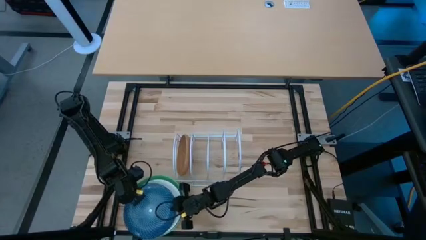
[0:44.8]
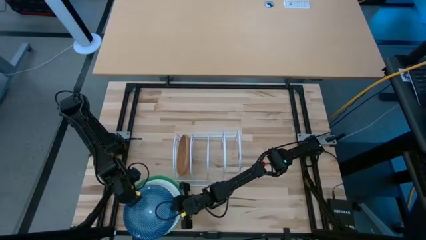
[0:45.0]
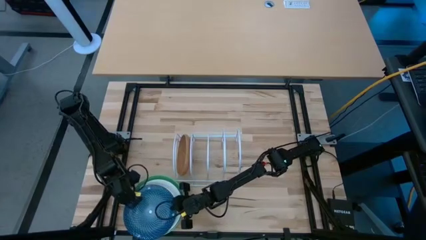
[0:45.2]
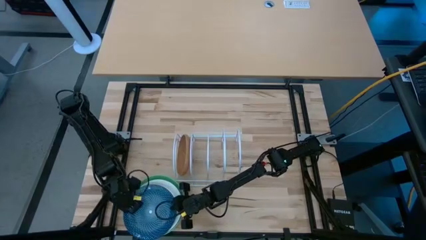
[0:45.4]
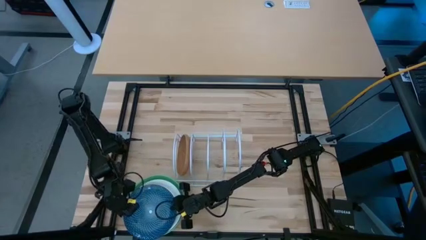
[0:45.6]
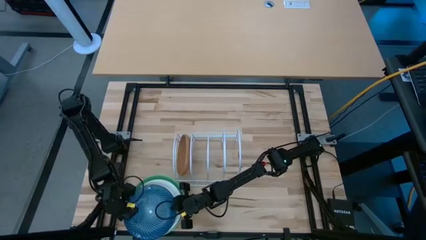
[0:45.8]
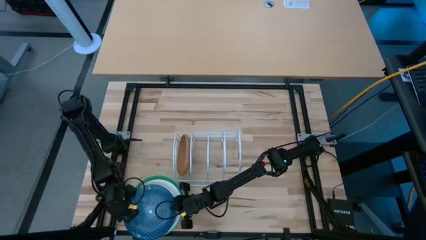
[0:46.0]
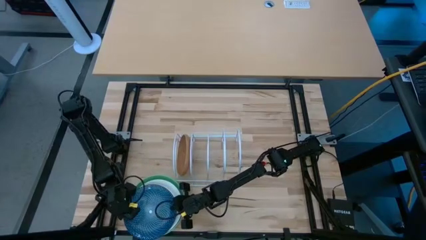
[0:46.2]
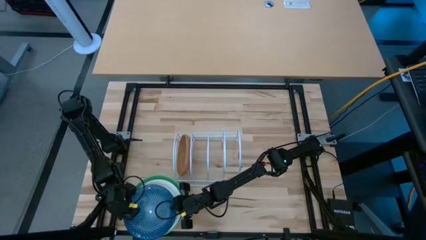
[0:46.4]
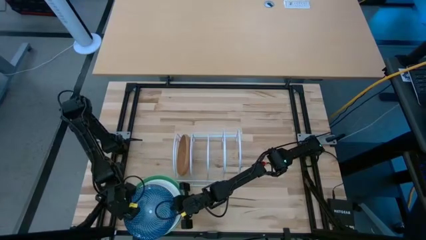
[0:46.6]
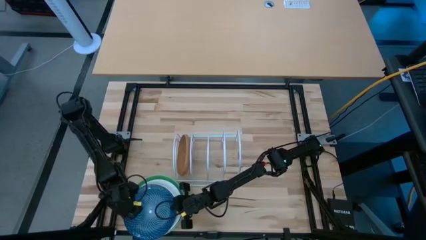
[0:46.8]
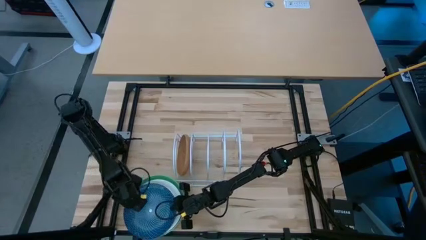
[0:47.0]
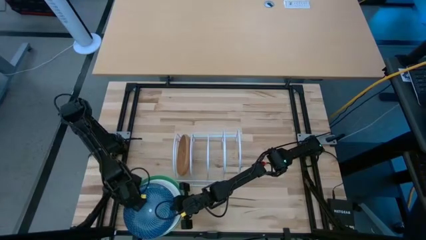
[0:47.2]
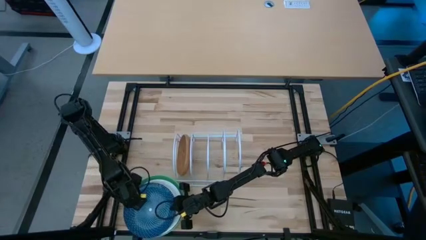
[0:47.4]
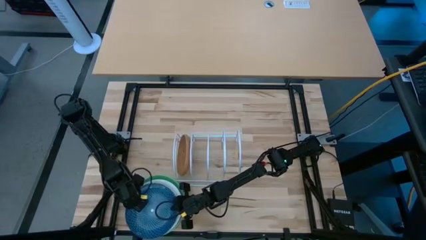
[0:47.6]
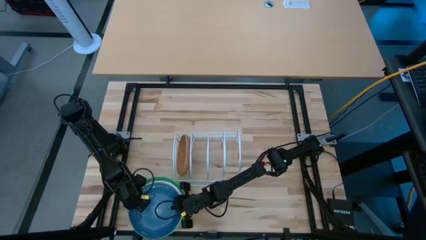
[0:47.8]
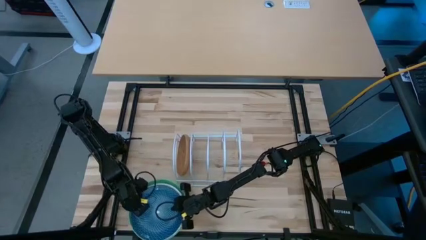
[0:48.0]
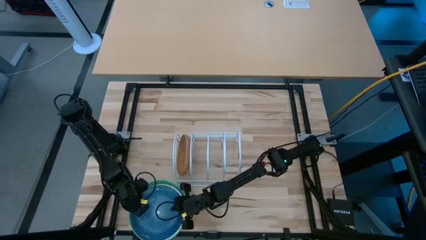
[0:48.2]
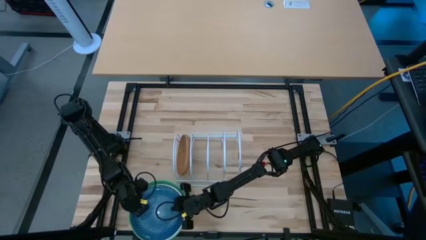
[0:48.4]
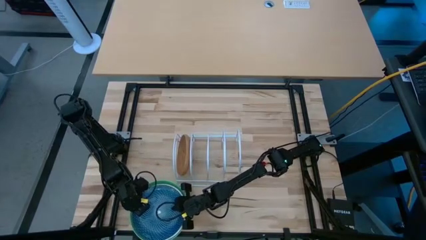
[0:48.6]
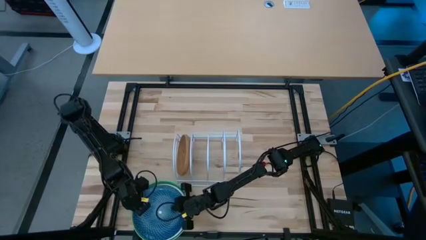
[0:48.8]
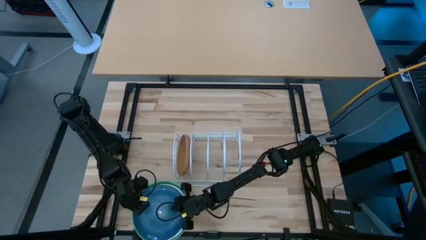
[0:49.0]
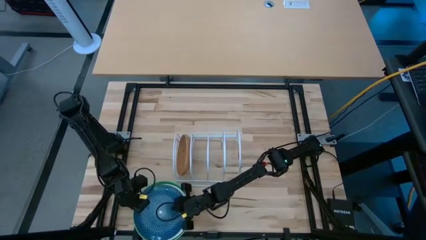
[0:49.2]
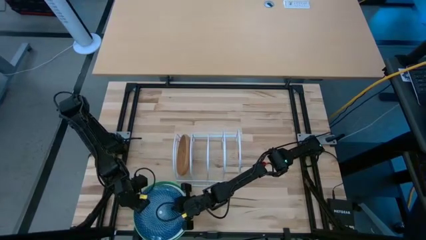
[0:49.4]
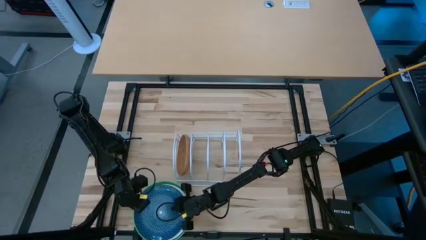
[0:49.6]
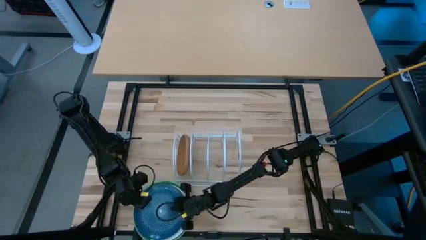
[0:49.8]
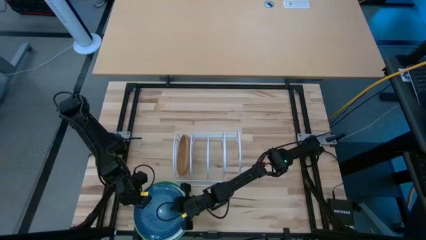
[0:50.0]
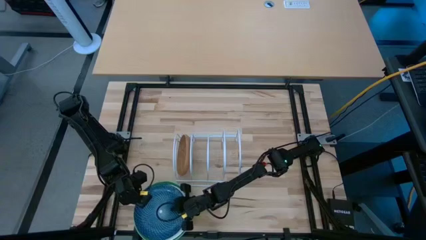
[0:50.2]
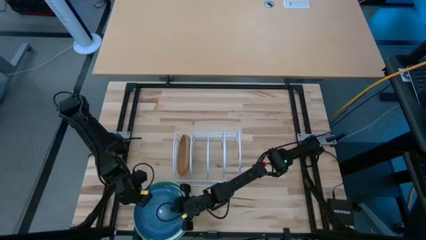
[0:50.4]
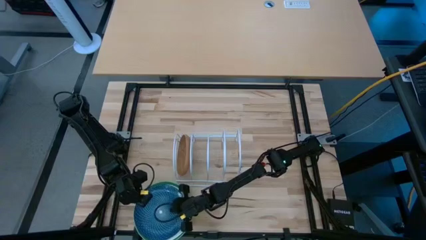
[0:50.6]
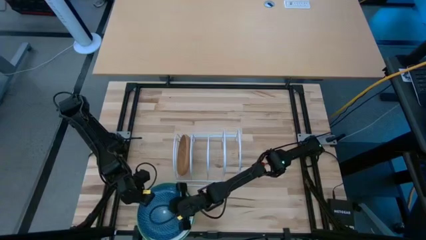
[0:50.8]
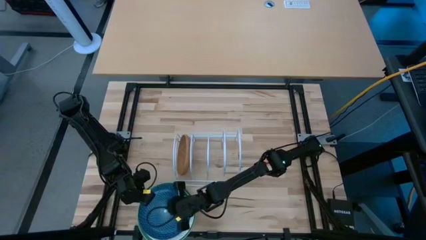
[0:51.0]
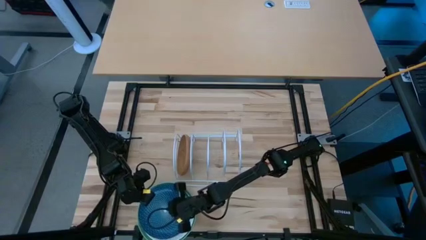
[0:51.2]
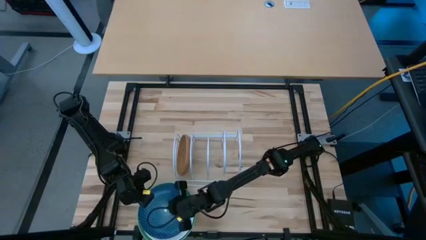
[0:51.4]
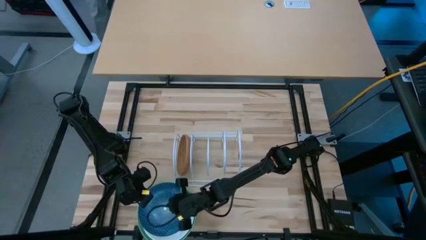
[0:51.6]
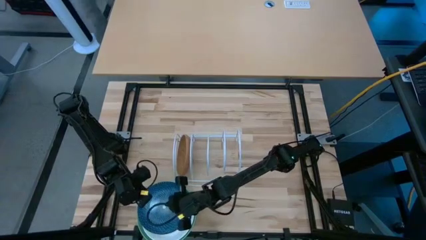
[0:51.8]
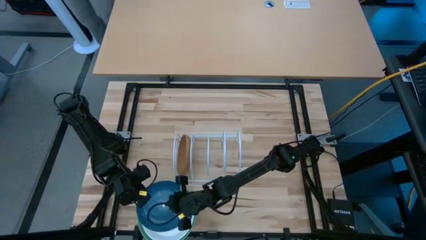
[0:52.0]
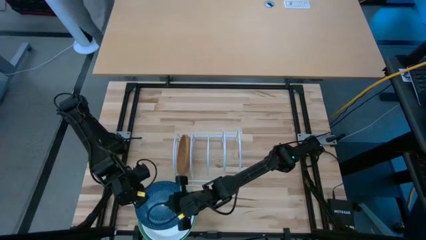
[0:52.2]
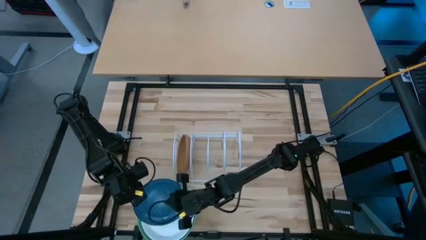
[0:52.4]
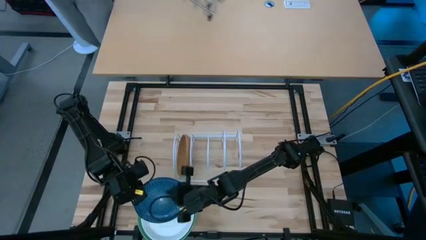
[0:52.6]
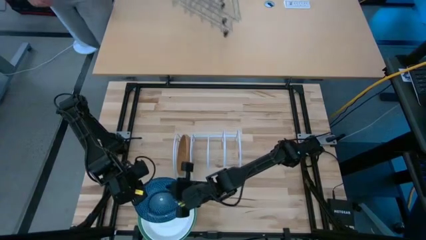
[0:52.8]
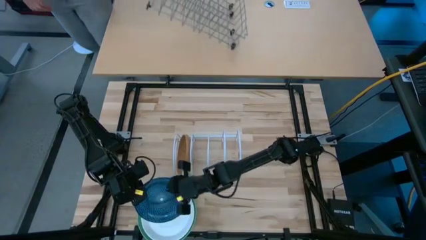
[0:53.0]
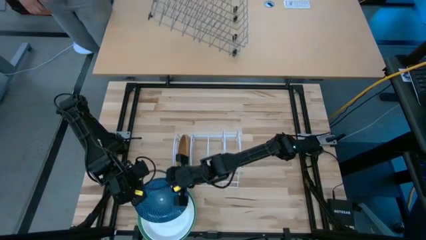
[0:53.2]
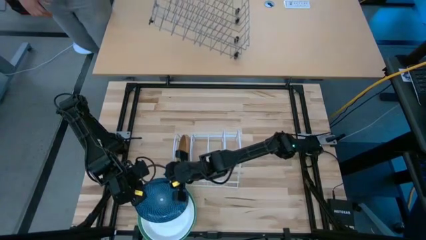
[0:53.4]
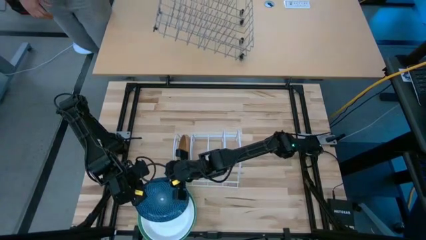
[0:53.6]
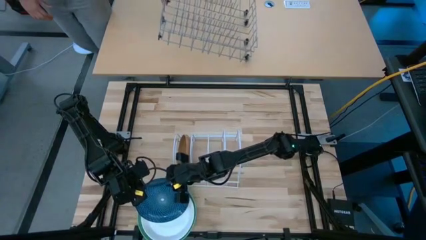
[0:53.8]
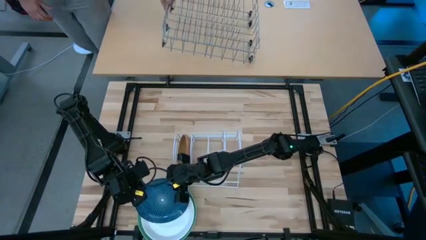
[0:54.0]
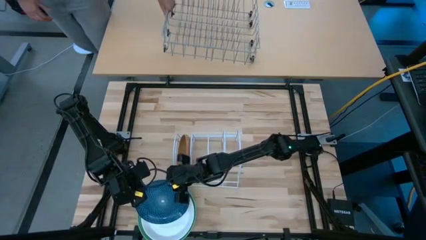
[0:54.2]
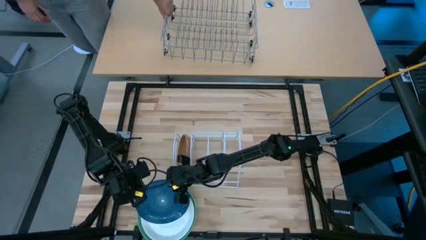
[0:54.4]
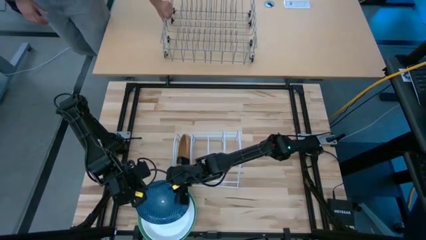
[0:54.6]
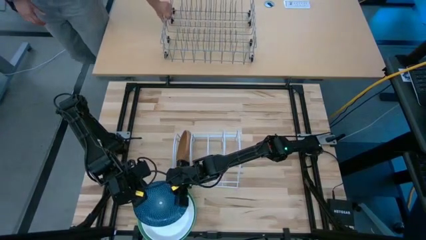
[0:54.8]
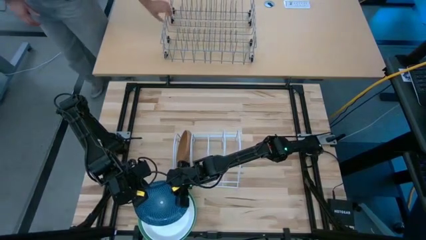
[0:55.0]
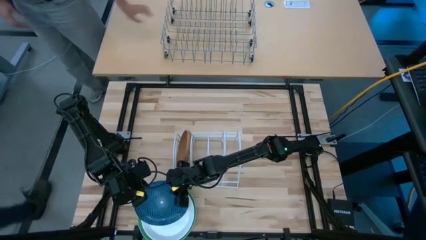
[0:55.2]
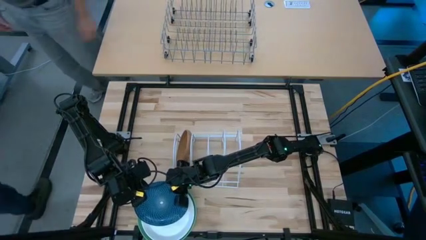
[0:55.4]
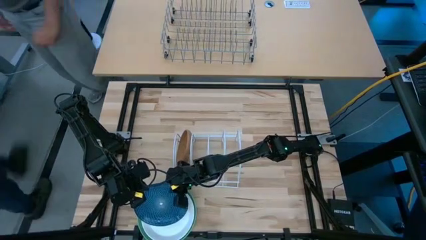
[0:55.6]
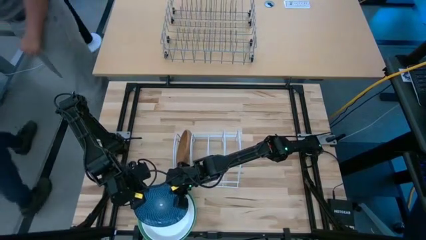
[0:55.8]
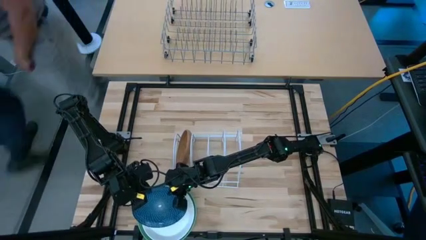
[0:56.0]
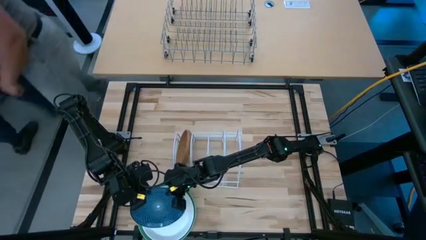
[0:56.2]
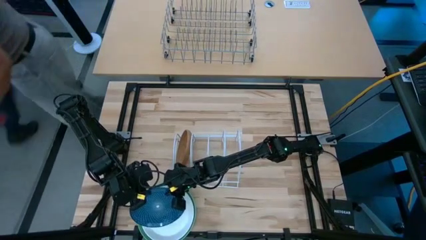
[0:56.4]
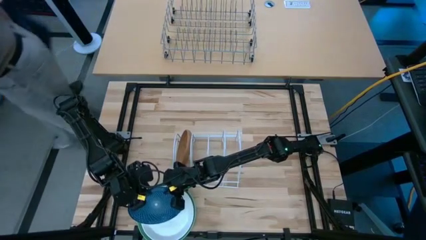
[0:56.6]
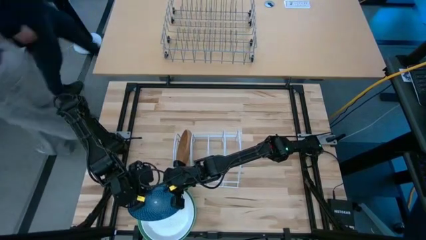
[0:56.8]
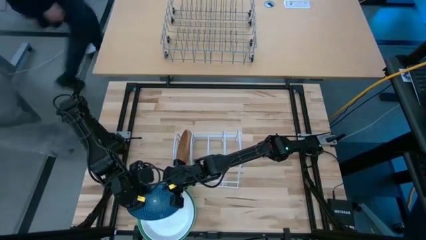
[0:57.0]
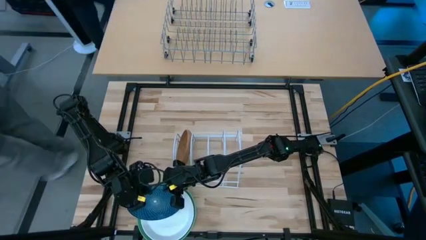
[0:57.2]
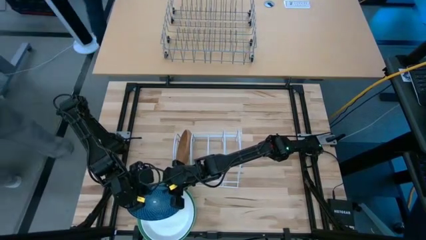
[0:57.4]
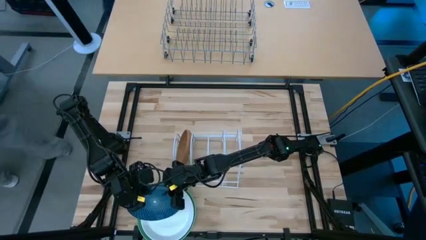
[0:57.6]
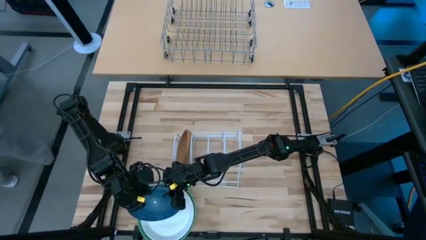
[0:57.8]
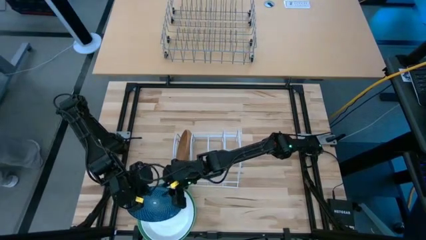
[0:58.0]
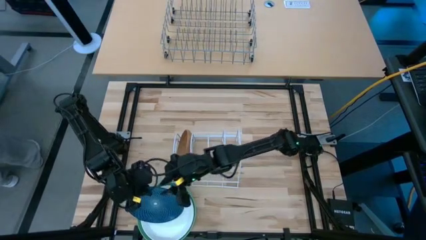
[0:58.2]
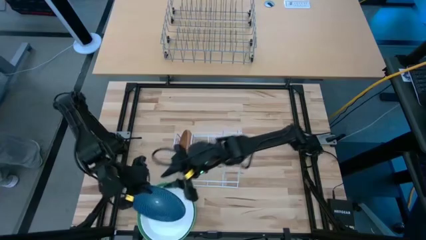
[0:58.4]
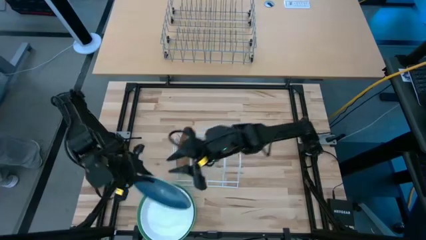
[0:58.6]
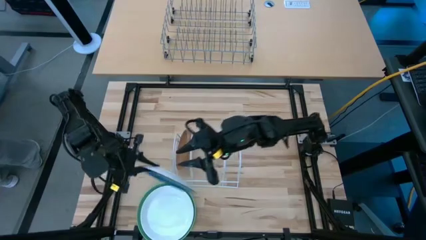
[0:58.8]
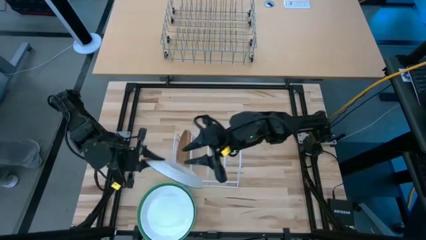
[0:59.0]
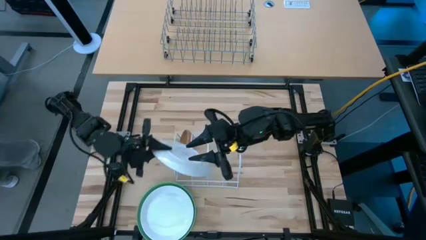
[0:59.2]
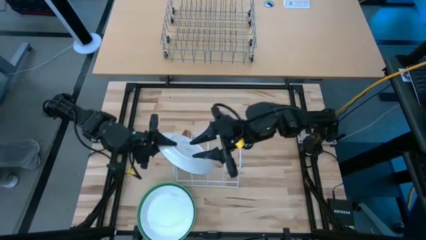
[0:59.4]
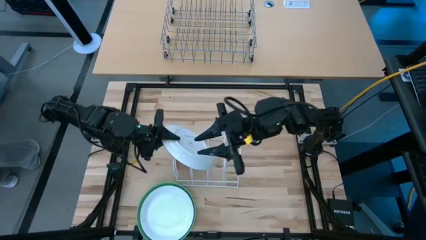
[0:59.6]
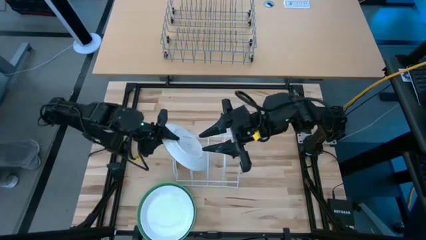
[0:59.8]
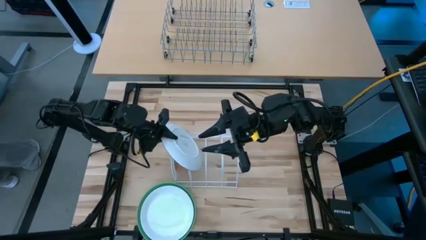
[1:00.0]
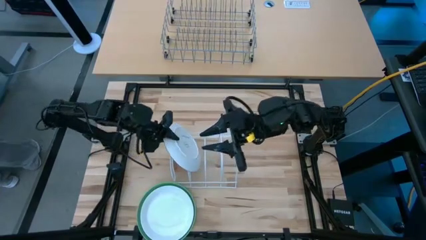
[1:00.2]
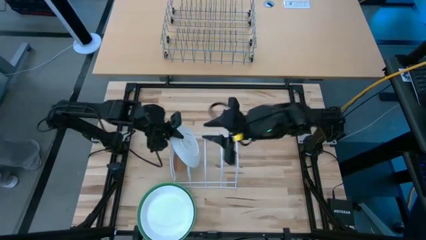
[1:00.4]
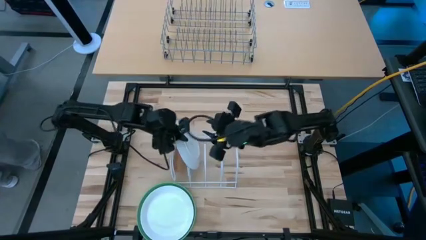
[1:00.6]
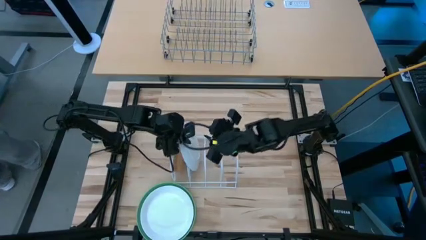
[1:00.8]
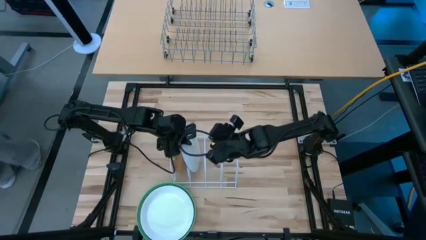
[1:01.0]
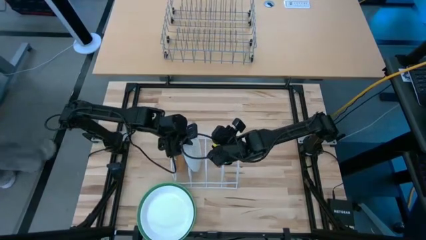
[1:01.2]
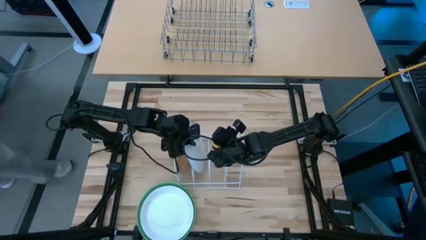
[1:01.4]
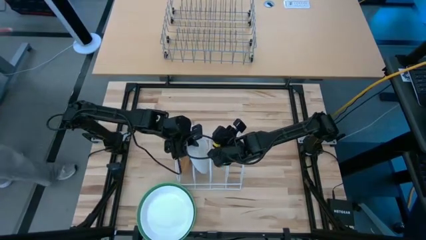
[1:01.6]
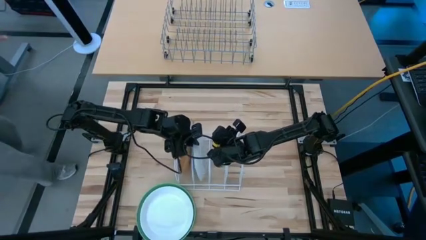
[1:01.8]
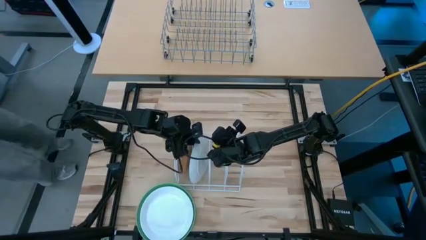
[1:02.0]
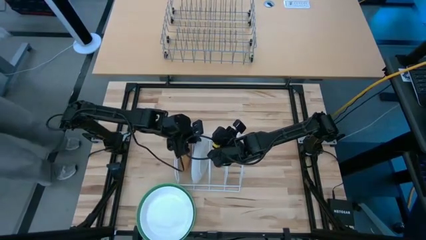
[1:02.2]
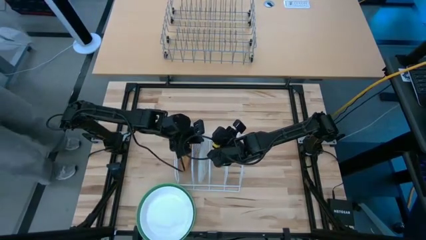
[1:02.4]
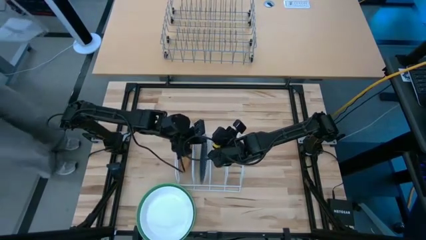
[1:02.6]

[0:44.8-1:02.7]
Task: Sort dishes
Put the blue plate into the dish rack
